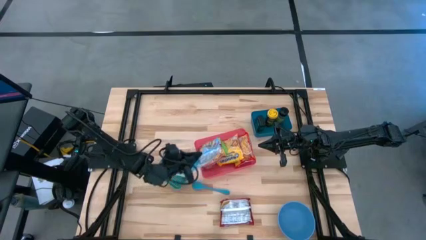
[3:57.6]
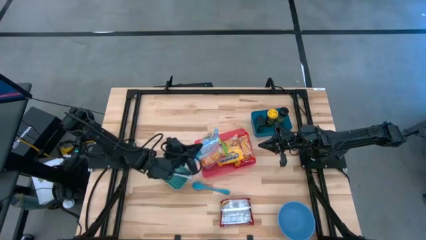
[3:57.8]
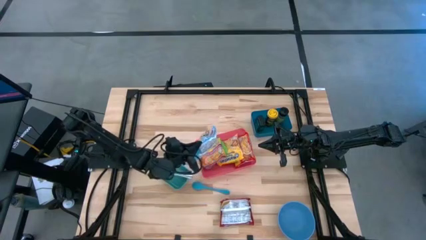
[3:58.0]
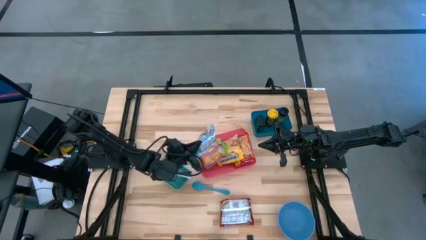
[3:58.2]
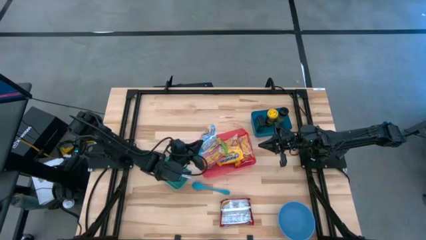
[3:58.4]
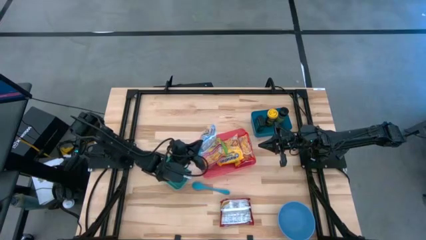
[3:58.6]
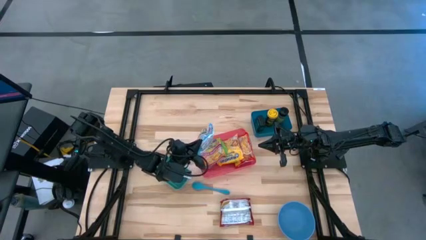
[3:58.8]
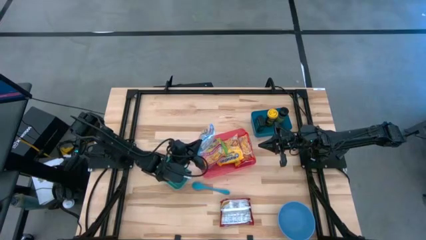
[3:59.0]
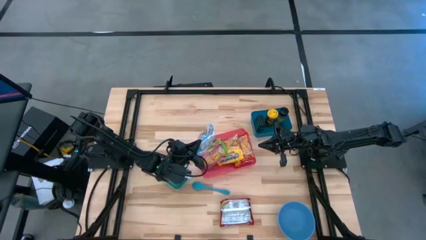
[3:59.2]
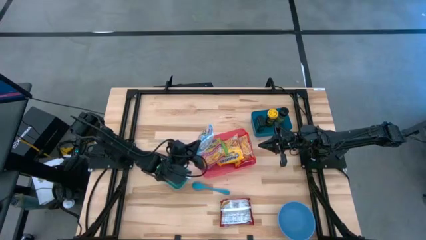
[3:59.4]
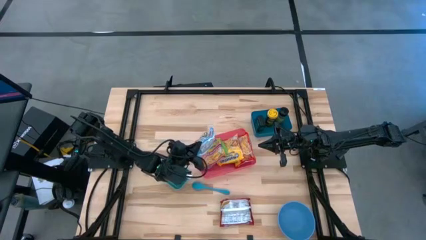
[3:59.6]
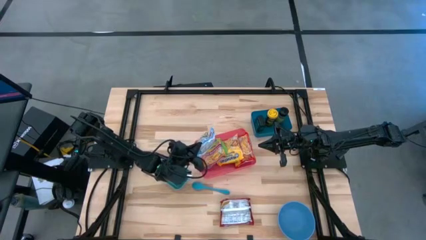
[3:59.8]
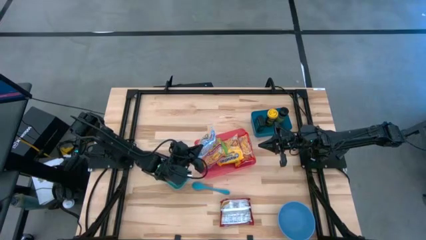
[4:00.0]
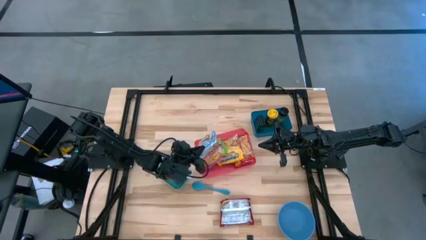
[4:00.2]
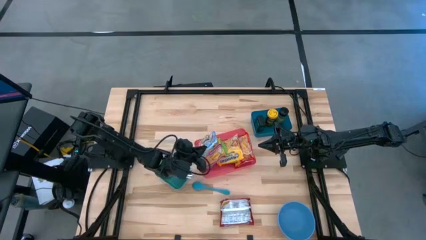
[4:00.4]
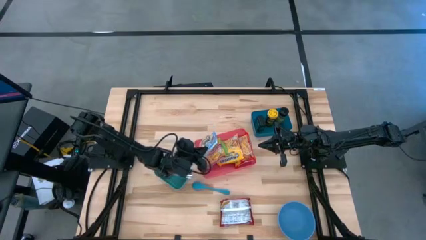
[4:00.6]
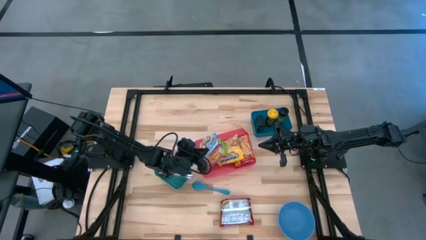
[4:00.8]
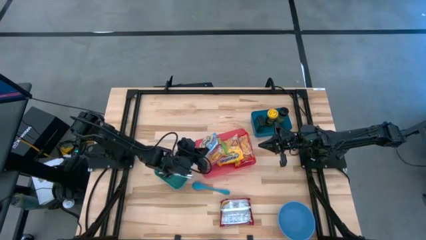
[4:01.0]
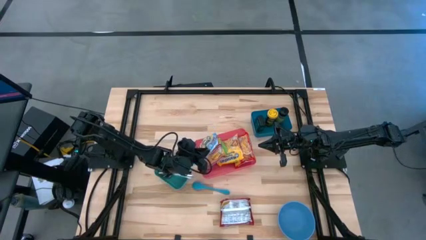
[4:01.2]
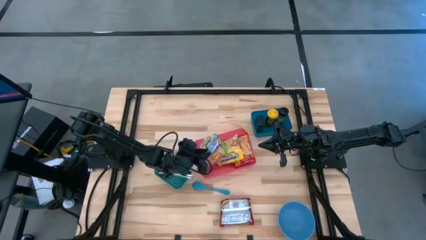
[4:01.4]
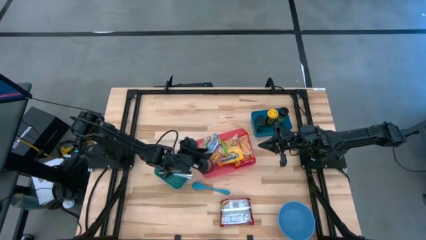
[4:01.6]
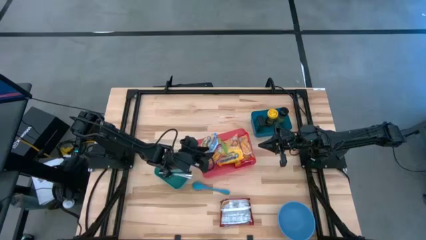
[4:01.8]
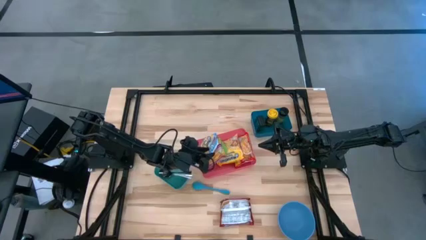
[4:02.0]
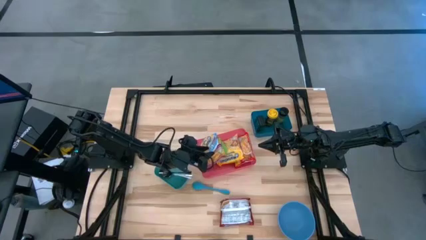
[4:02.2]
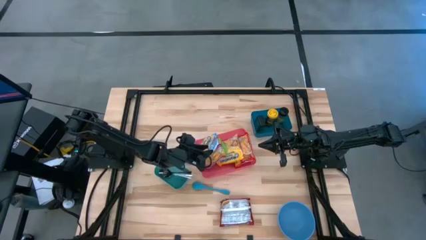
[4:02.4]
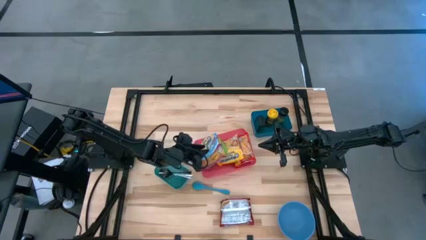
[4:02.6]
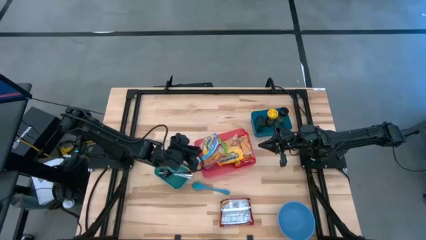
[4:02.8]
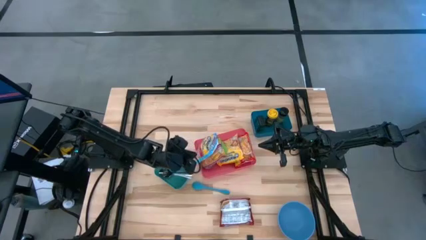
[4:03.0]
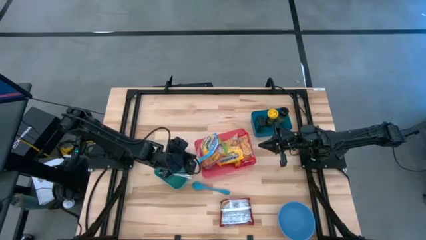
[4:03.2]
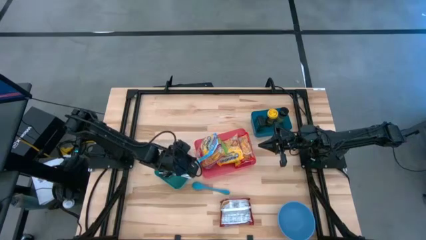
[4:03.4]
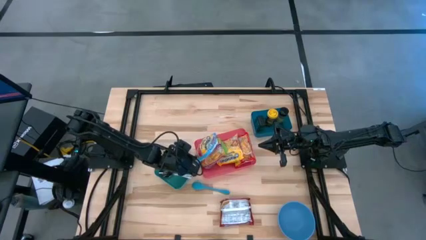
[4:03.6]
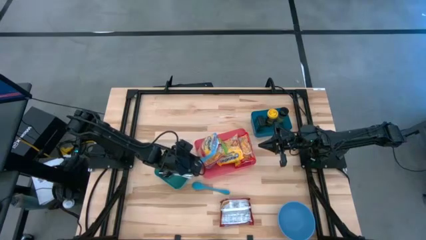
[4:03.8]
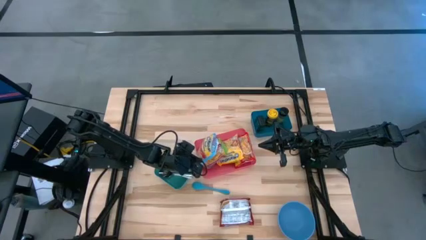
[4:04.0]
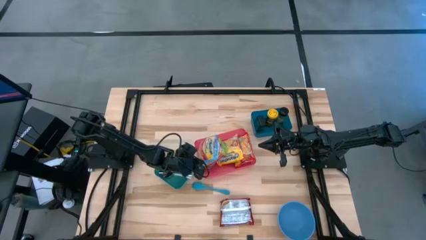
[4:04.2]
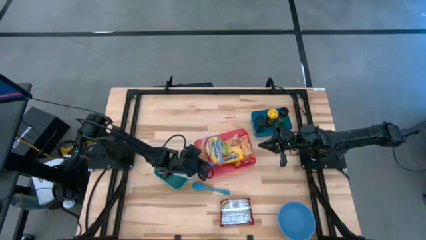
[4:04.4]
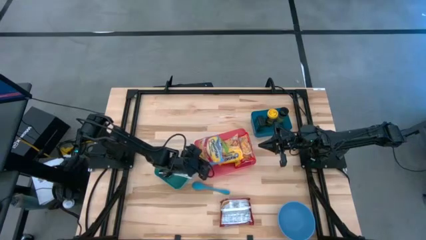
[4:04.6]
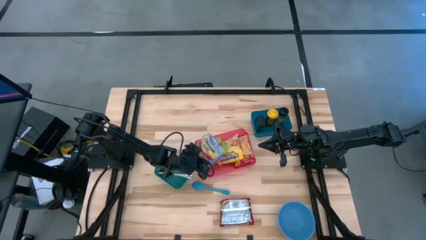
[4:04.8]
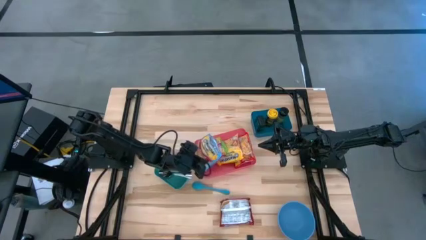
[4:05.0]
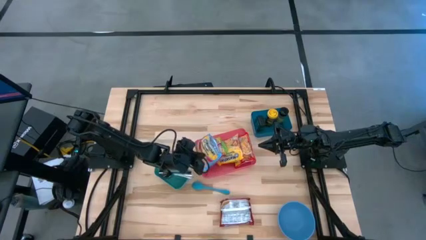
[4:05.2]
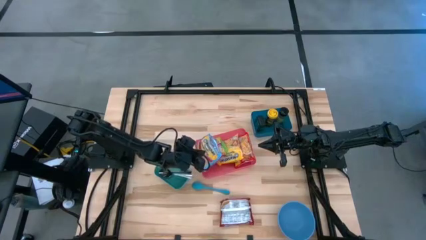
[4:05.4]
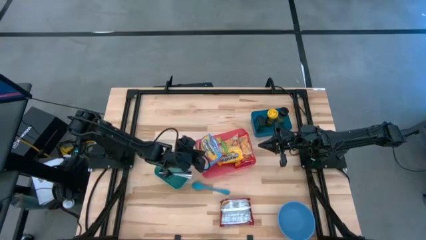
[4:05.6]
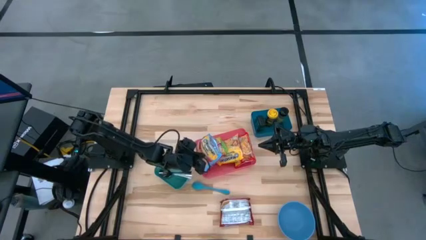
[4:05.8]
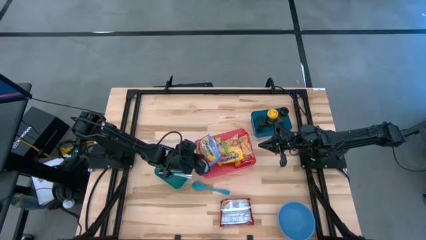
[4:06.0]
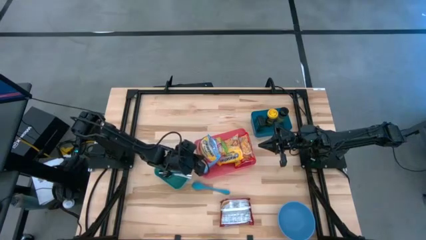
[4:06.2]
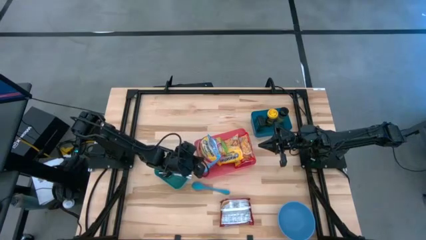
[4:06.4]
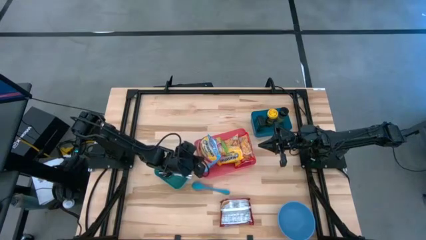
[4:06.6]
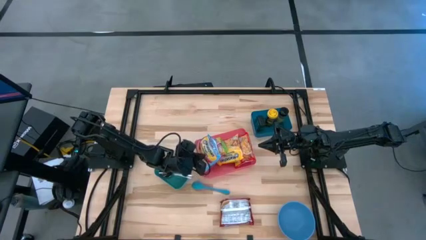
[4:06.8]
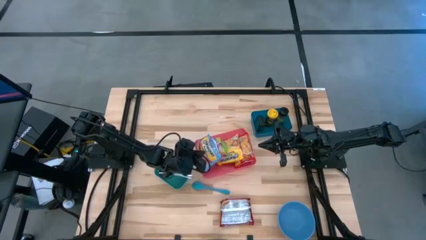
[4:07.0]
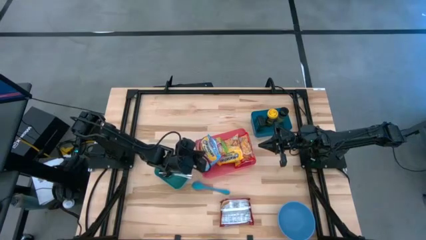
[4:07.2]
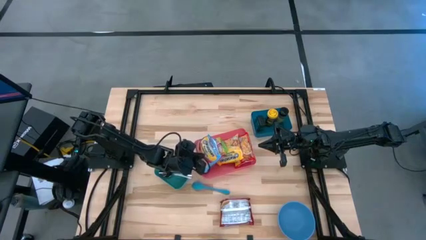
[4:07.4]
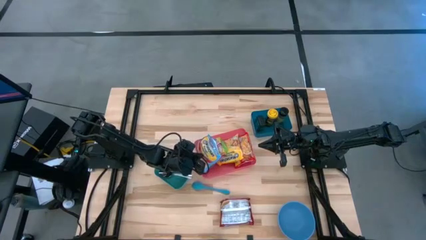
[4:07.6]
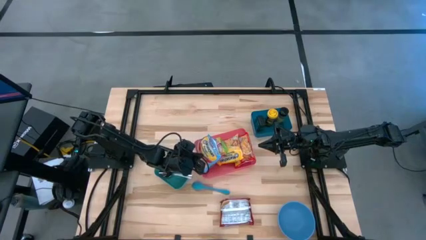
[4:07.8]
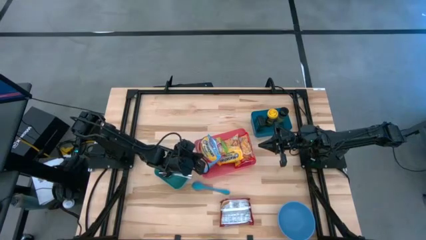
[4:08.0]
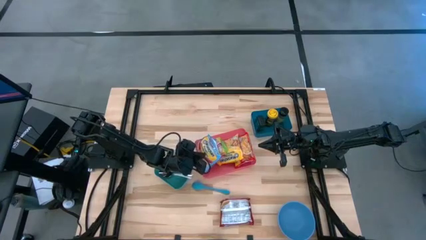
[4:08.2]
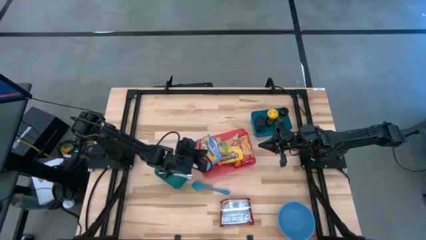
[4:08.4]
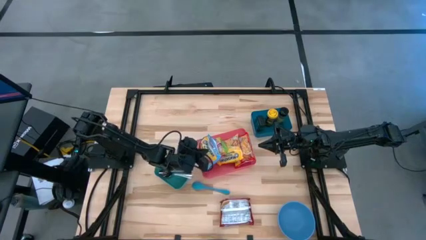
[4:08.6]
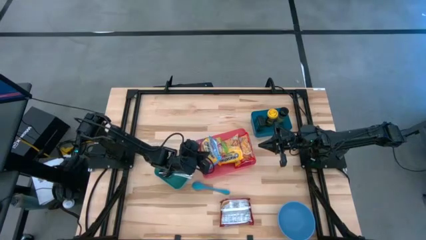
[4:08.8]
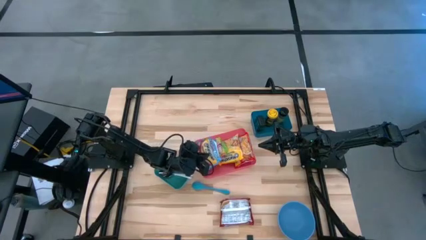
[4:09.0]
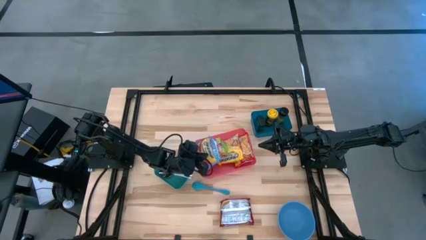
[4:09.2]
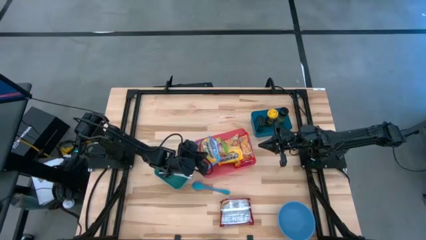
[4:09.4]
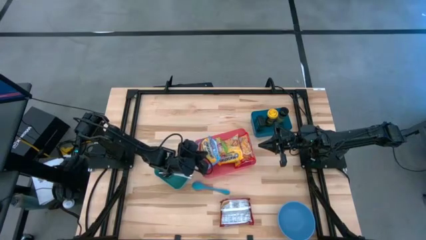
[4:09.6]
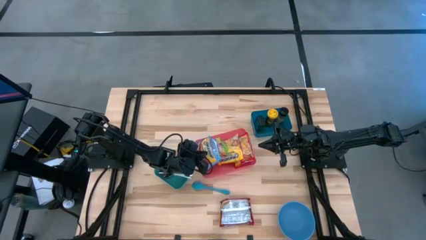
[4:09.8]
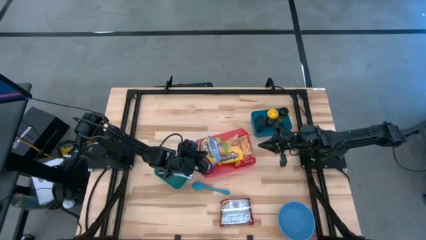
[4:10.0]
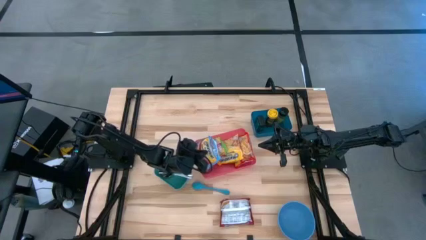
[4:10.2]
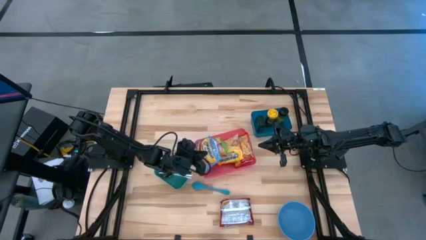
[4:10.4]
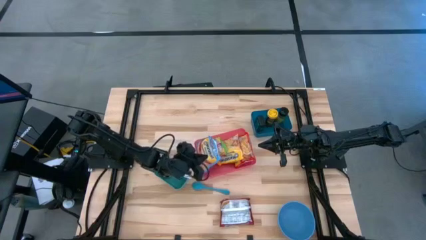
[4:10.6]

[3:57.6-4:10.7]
Task: Pick & Place Food Item
Put the blue noodle pack into the red bin

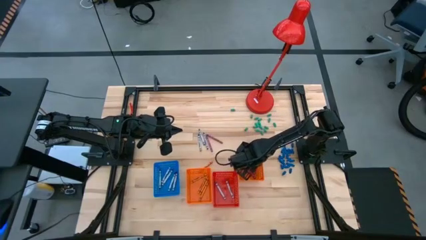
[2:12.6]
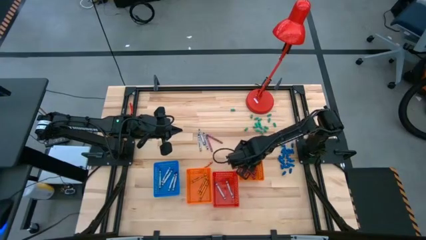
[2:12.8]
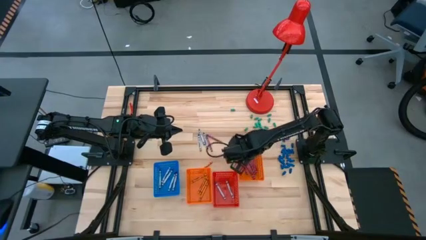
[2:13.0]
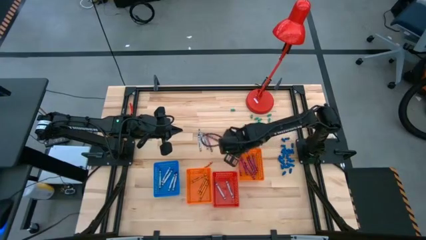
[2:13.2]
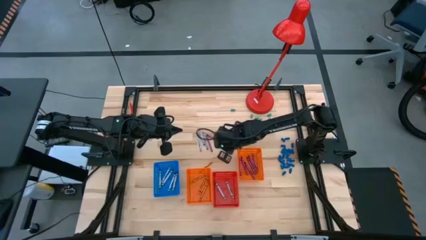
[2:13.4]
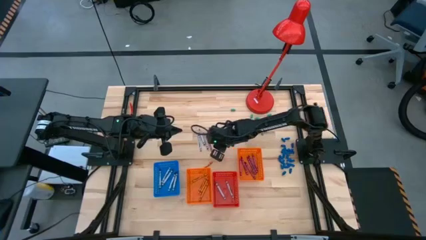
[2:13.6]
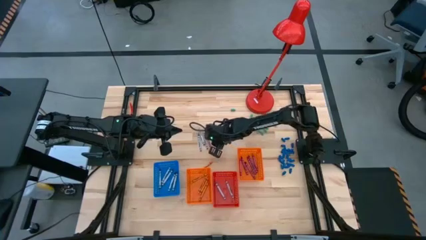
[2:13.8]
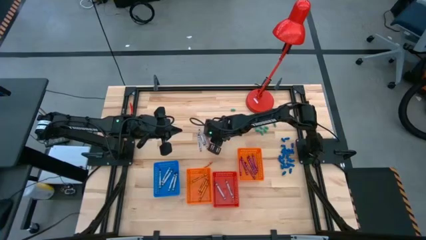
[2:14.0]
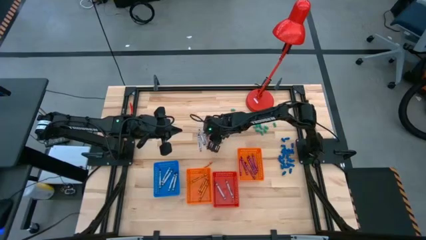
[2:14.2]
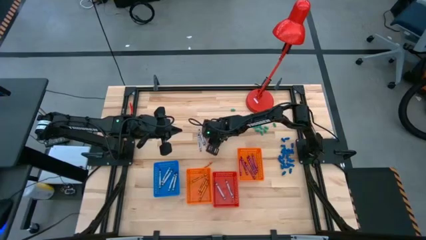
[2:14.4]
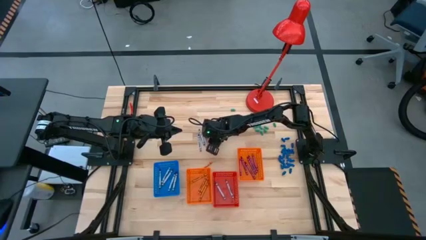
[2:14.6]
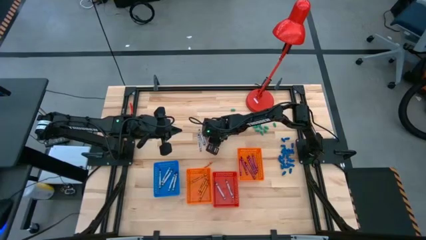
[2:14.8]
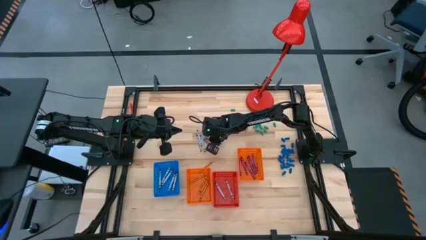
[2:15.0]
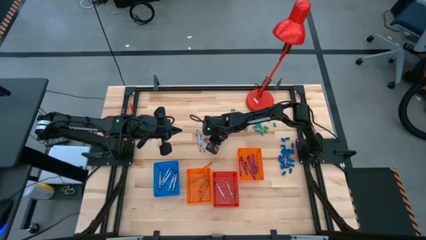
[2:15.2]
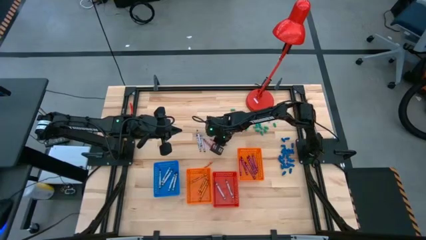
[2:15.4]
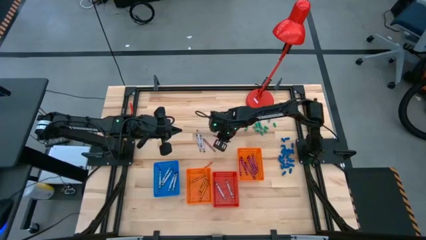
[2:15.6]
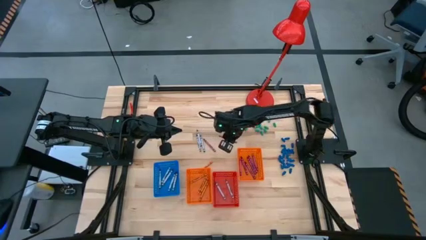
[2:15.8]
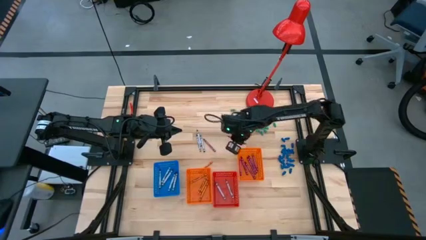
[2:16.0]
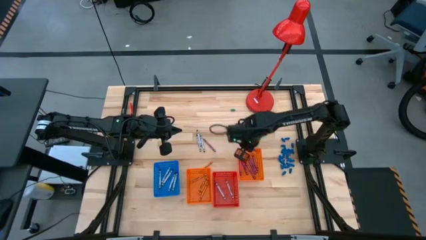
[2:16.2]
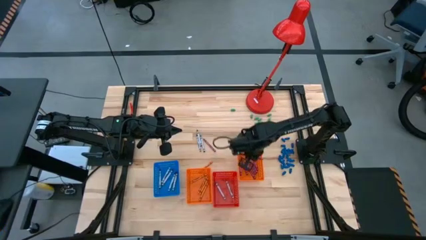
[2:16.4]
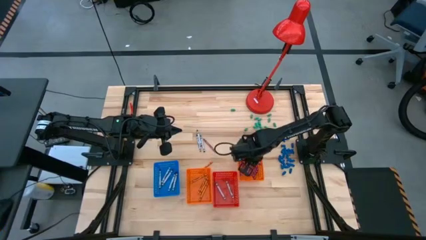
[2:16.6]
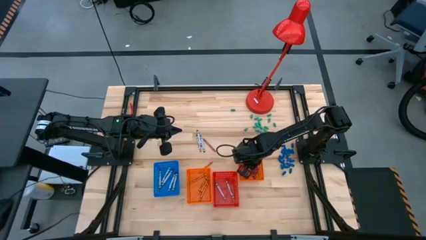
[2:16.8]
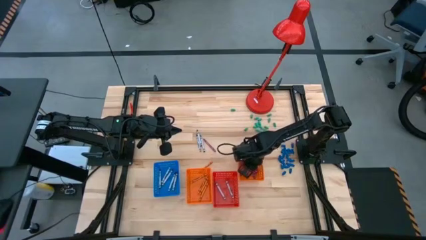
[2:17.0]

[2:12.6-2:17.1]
Task: Sort crayons
Put the red crayon into the right orange bin
